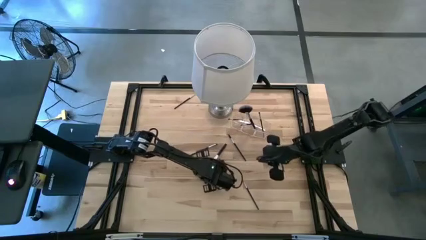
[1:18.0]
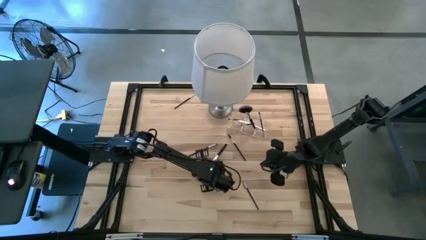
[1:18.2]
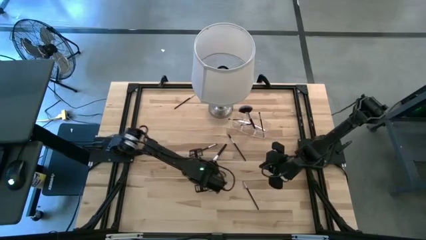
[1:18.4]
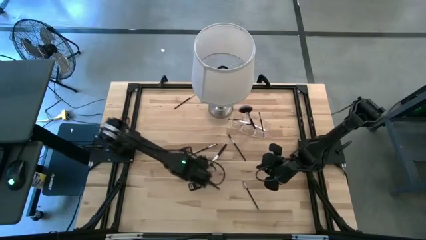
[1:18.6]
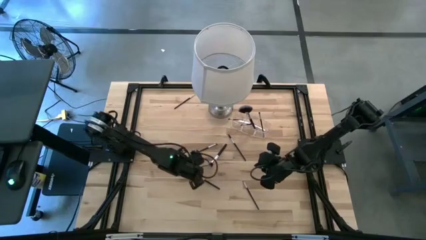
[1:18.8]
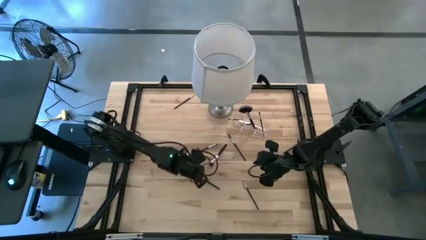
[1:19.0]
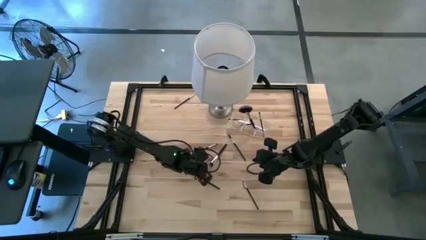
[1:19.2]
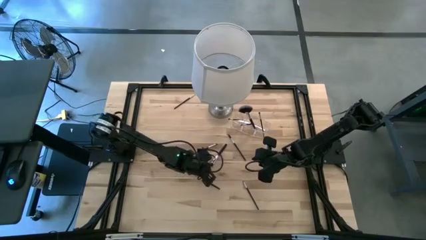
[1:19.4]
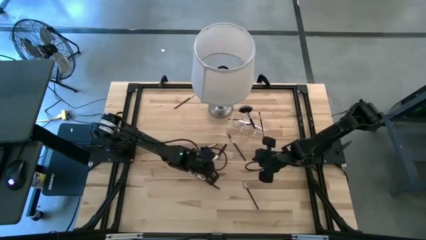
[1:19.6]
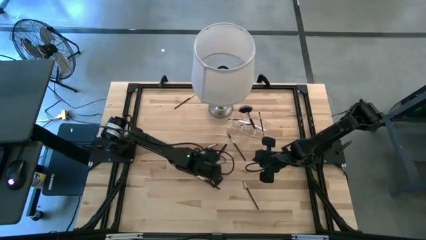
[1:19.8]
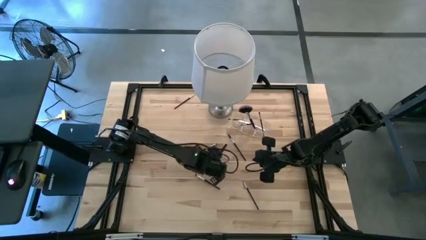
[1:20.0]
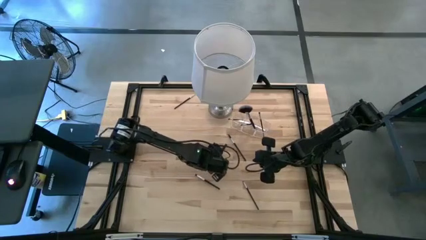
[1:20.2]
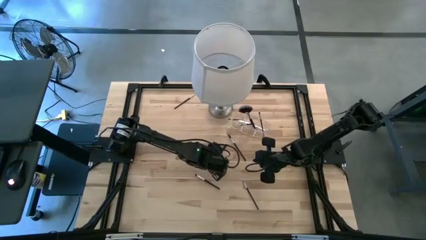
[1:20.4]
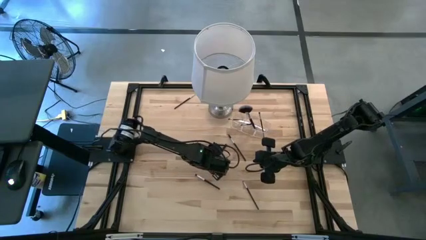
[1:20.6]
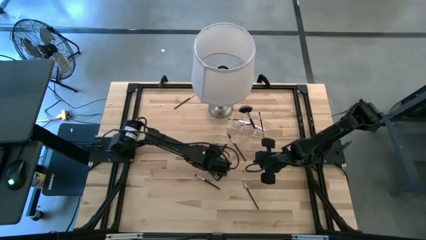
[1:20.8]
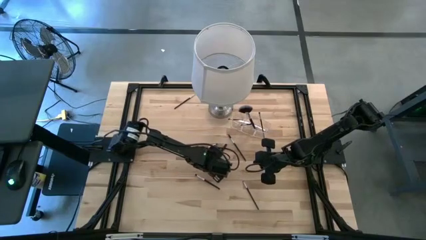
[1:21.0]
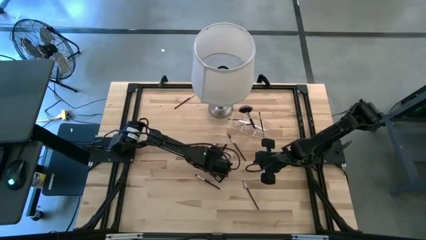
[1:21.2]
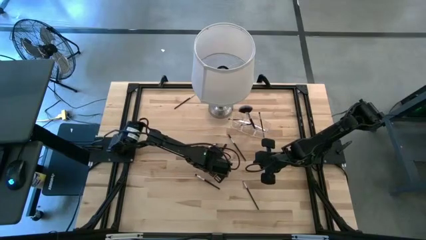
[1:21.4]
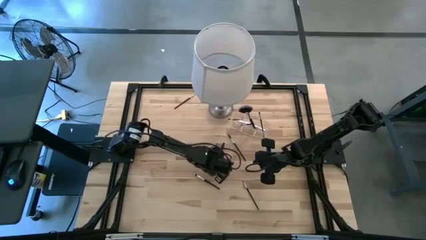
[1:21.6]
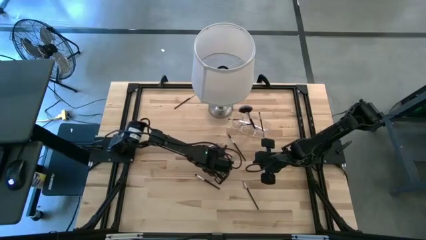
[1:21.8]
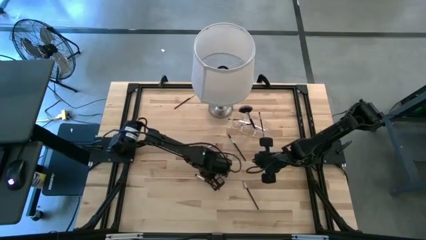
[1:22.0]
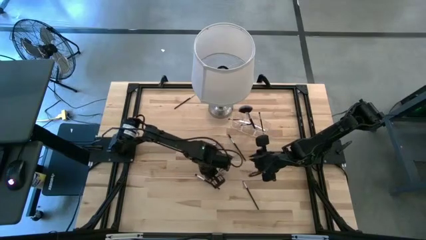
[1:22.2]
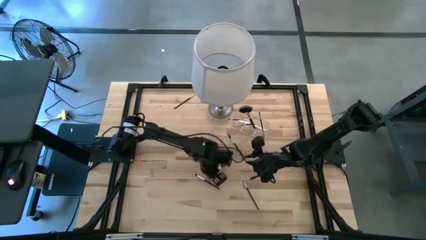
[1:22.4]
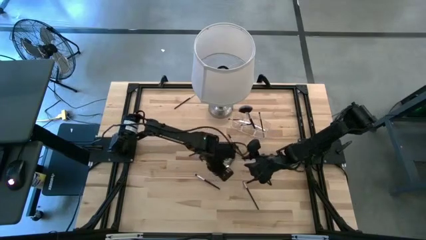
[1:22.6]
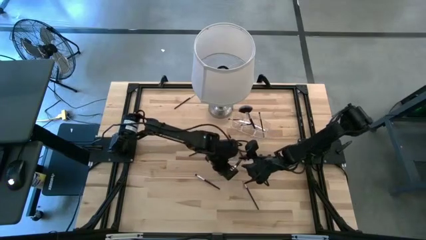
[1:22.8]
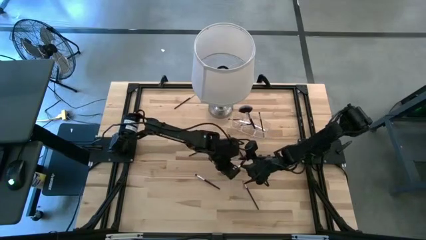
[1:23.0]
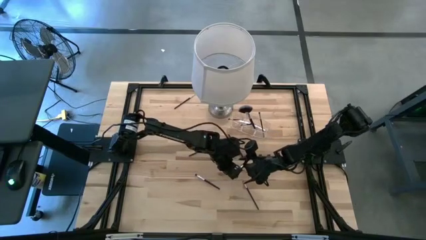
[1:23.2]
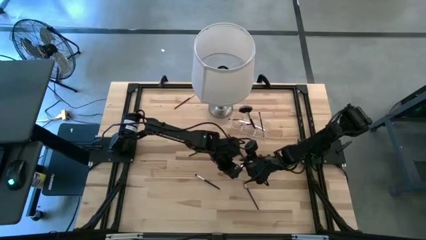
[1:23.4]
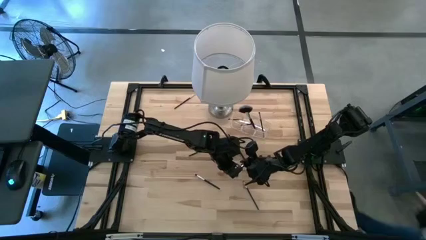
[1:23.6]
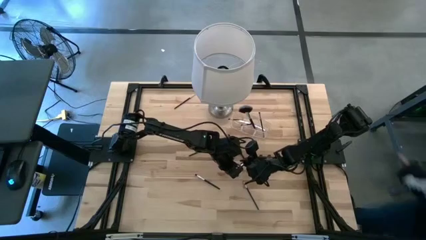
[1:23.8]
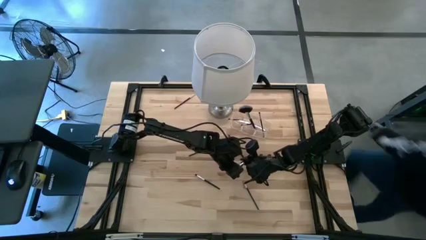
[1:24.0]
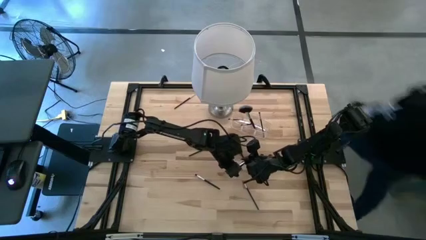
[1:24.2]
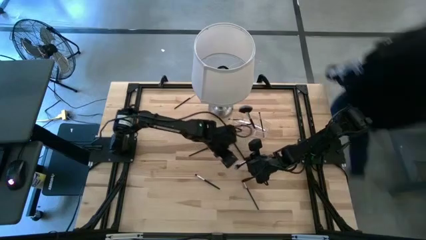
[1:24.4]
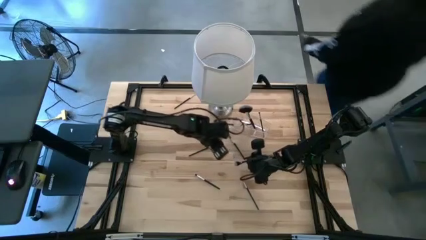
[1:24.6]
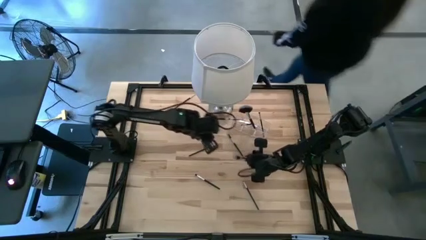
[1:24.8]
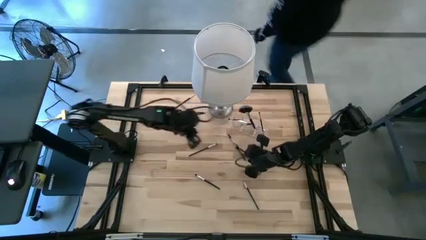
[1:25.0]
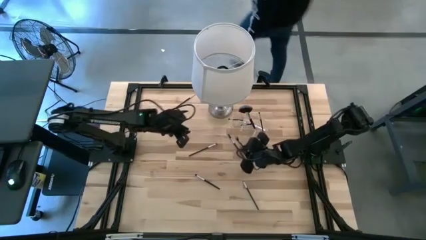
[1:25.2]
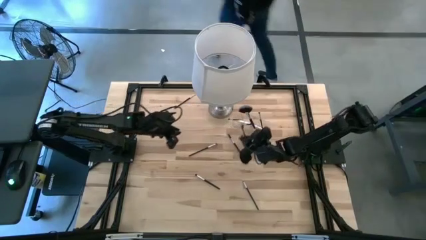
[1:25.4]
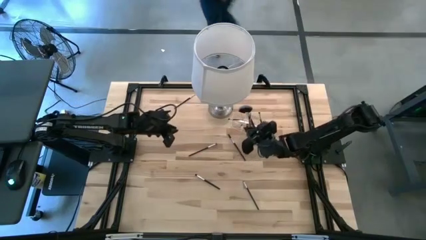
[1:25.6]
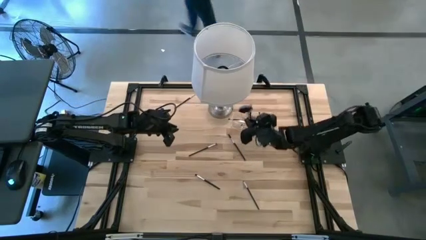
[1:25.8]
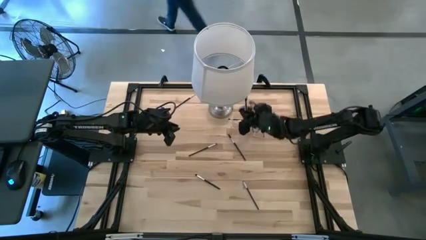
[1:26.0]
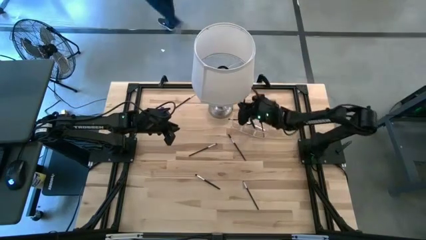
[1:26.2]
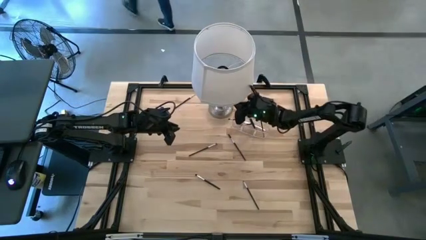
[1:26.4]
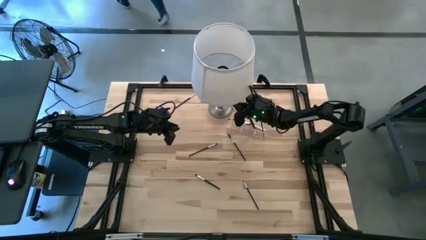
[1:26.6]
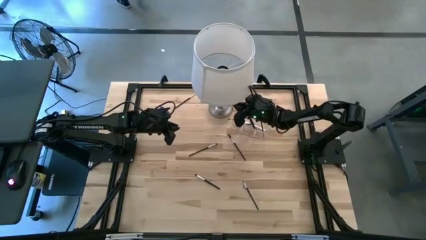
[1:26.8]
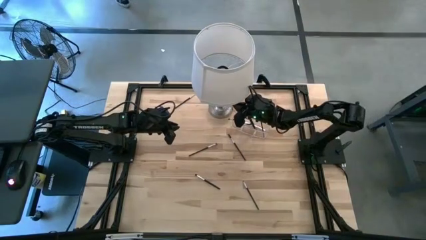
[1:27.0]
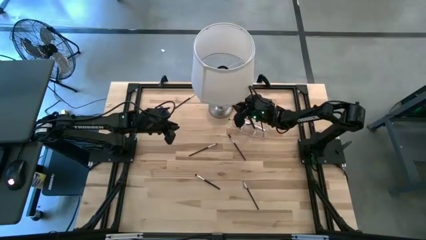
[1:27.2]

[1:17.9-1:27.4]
Task: Put items in baskets/containers
Put the foundation brush into the transparent organizer

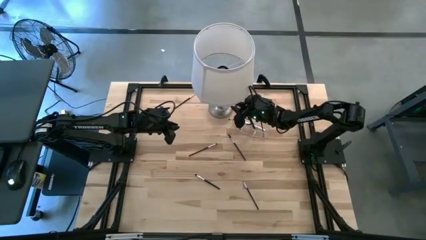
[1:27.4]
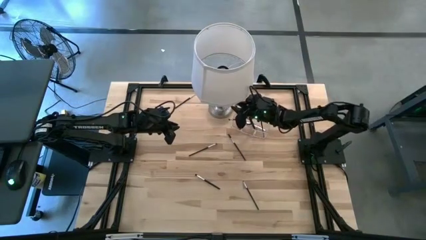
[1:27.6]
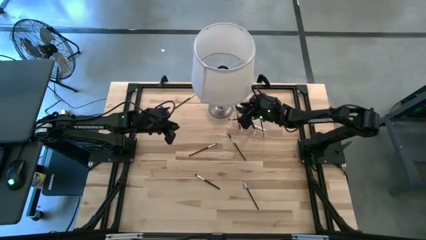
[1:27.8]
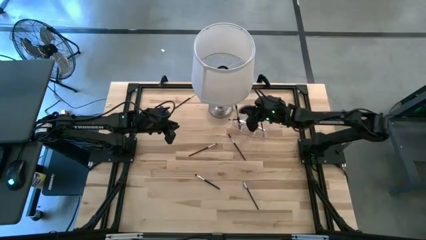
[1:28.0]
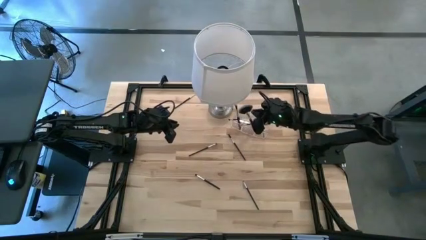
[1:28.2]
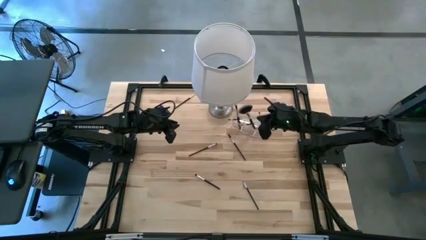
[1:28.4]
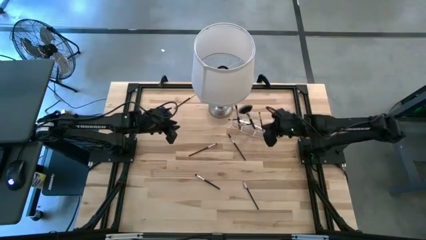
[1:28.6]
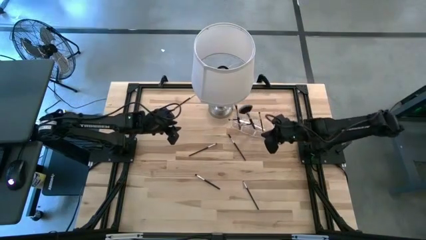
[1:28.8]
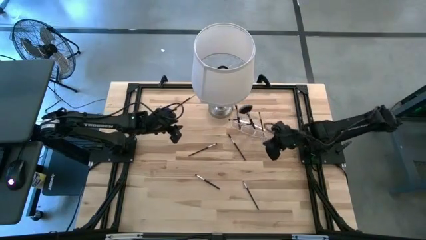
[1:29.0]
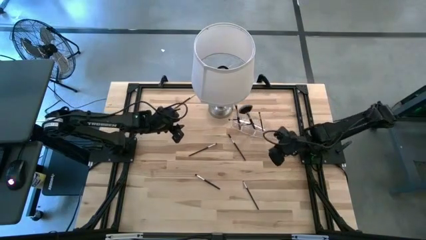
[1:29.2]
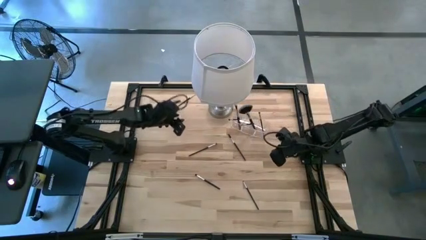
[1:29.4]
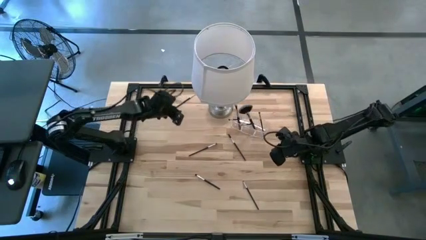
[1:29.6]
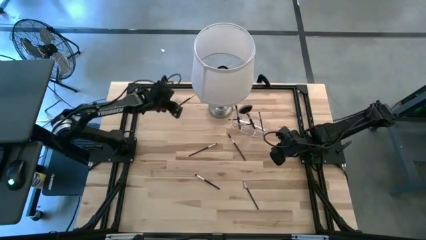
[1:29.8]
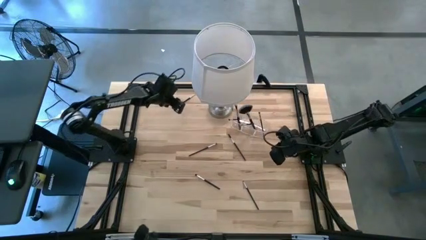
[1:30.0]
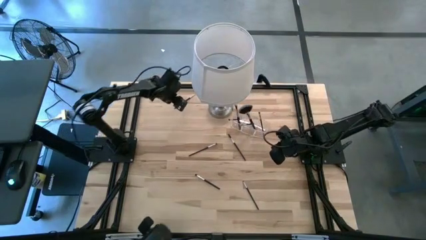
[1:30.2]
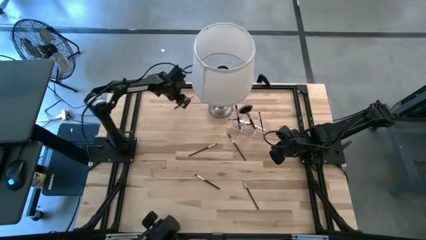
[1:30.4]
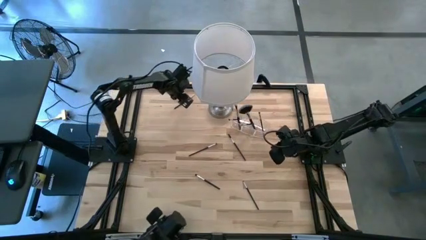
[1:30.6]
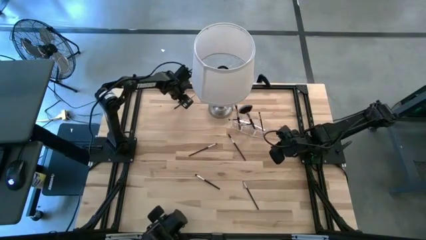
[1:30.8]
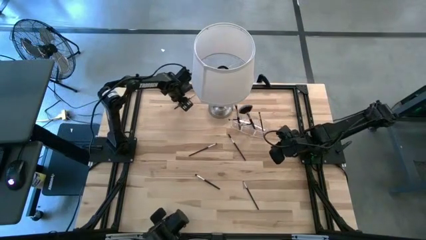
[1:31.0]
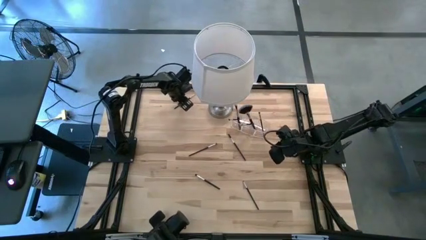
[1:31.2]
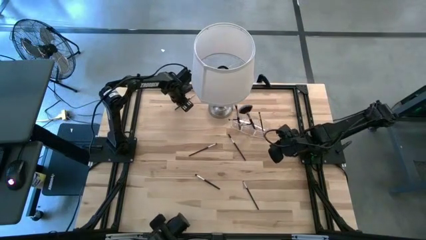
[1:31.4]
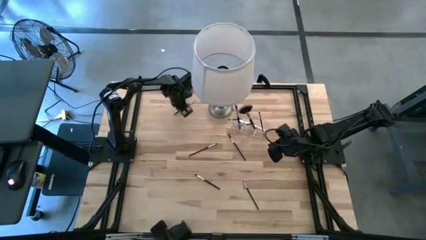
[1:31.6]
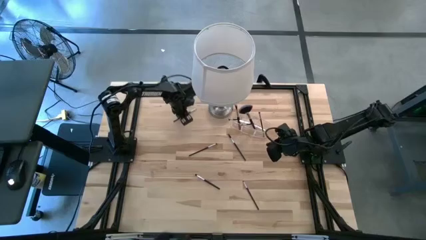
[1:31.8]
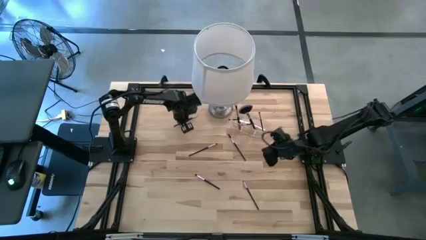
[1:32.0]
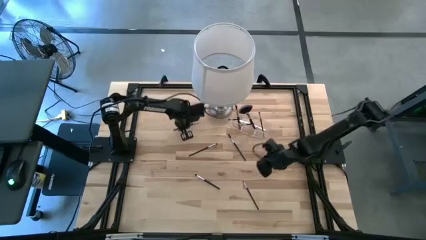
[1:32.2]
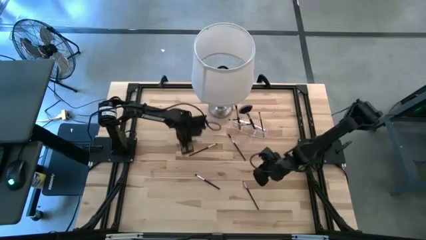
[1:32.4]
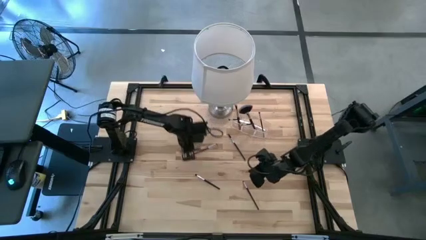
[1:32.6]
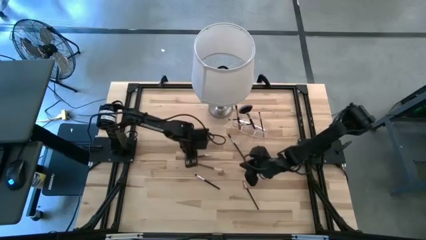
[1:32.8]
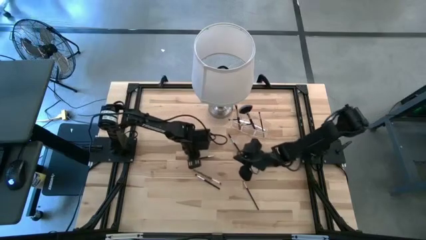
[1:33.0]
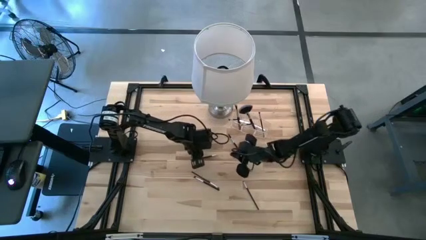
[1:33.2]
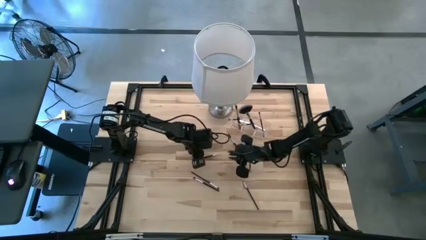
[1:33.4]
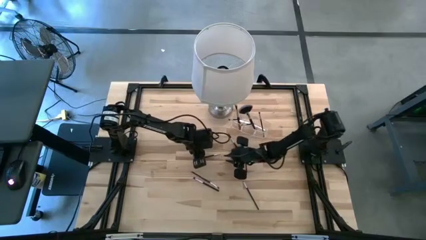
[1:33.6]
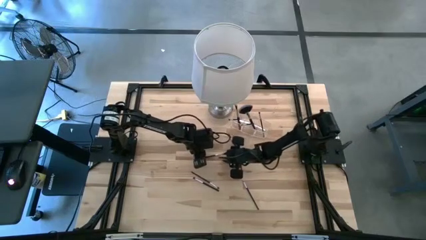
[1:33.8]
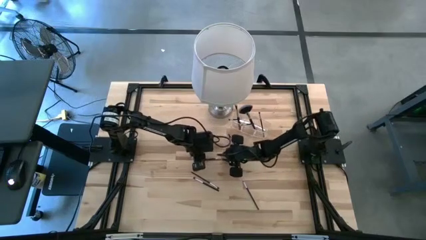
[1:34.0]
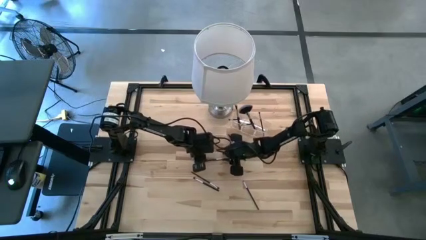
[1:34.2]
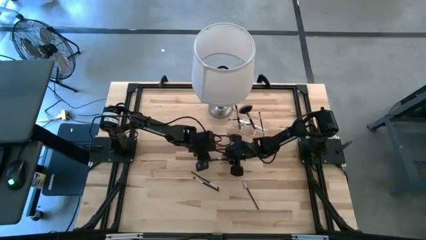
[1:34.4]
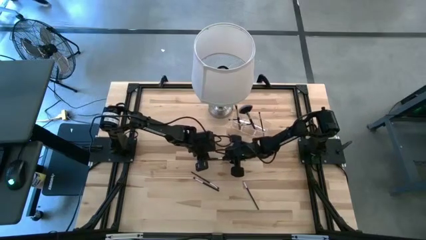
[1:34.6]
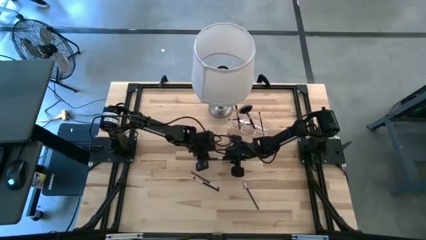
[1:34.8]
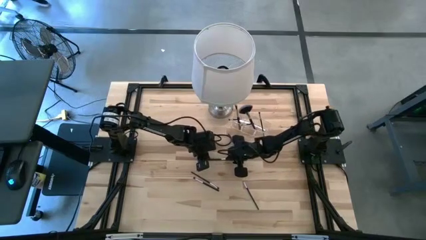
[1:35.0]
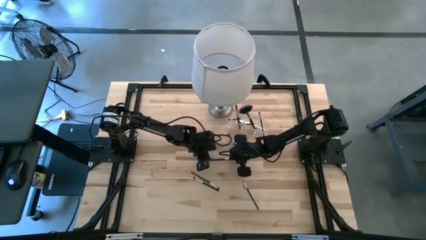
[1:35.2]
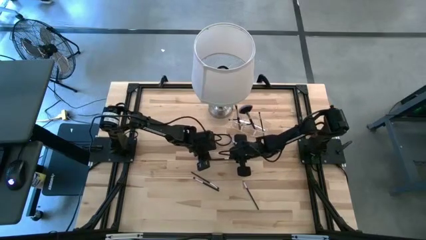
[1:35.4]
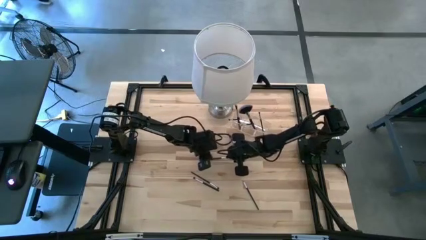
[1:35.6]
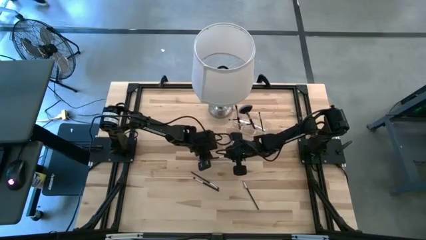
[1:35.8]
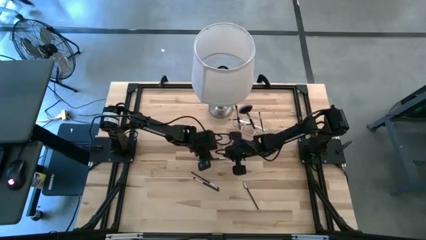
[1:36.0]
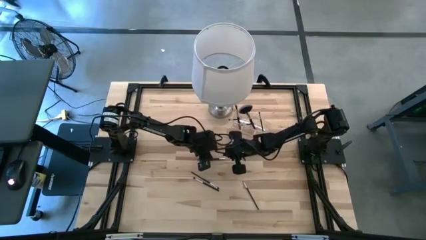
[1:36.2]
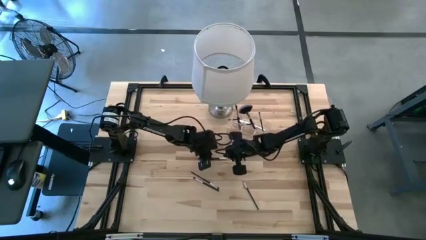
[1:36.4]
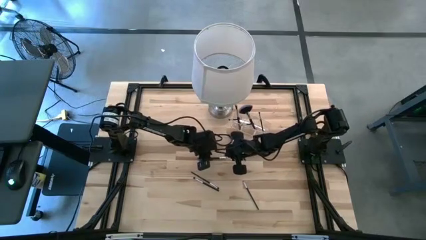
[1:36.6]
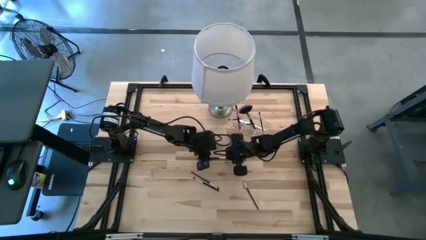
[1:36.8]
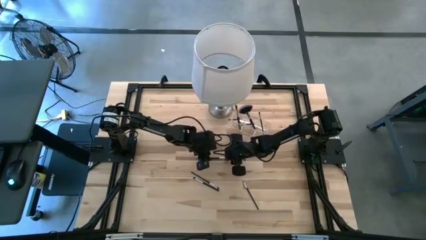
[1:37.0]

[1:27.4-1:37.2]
Put the liner brush into the transparent organizer
